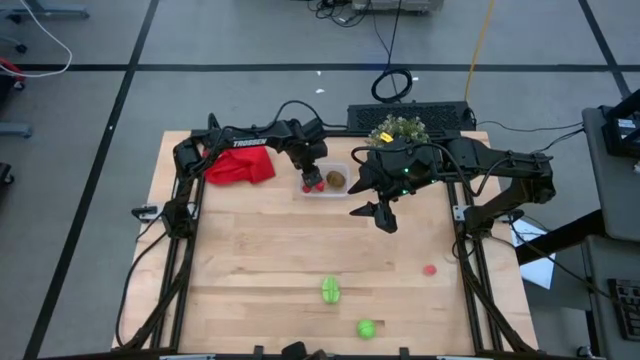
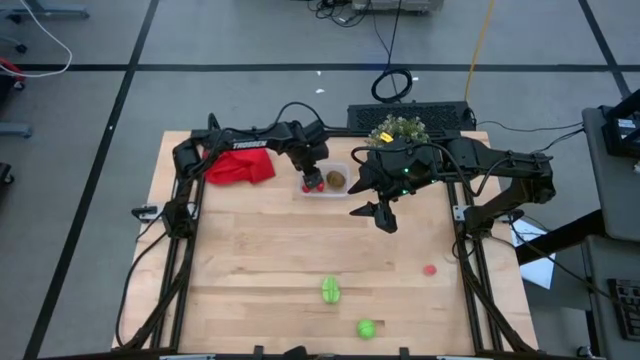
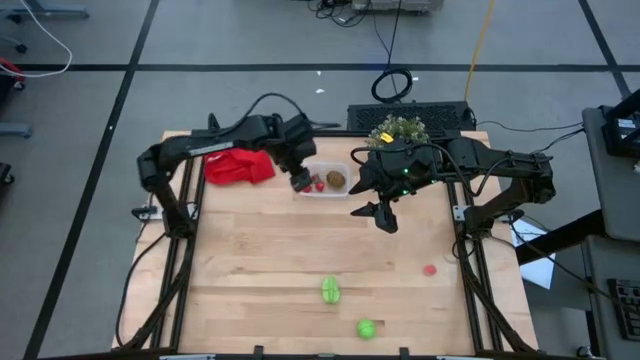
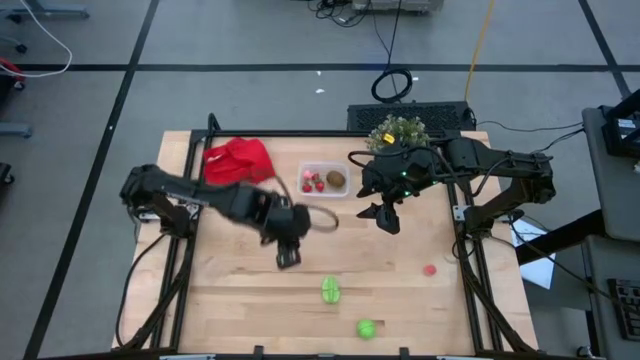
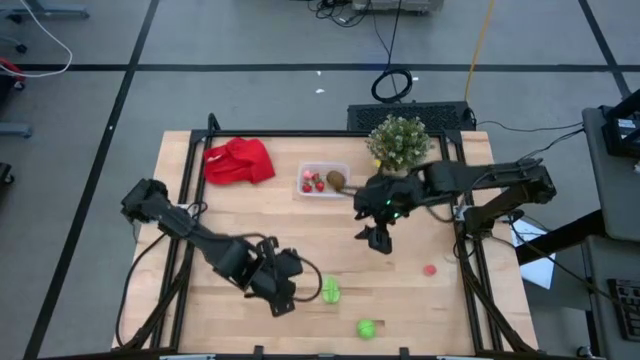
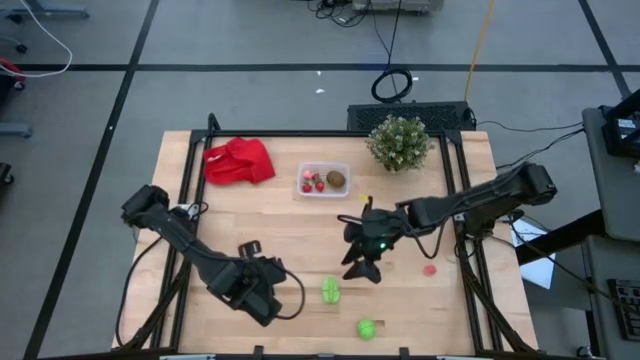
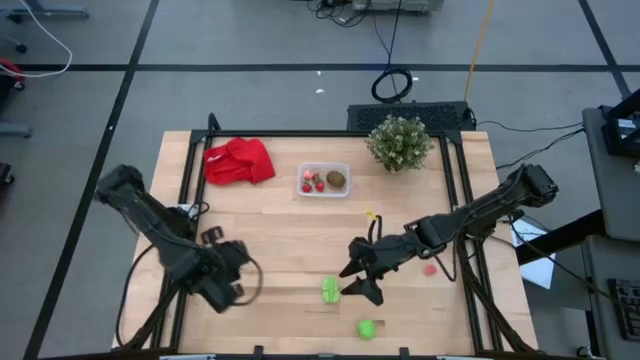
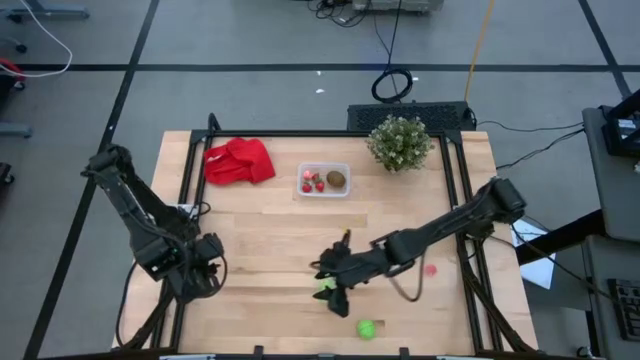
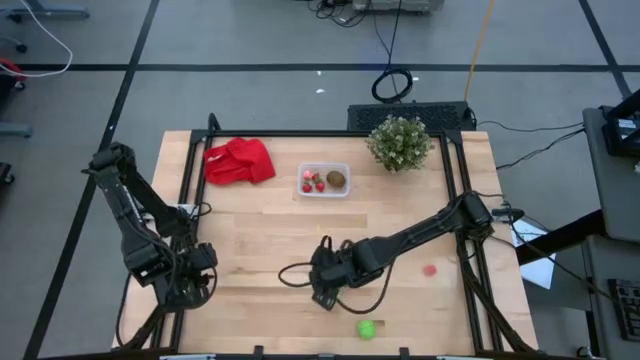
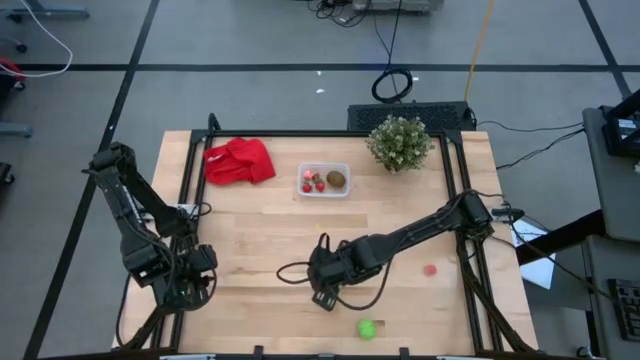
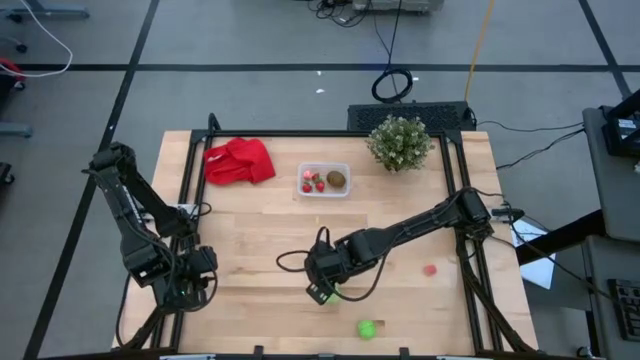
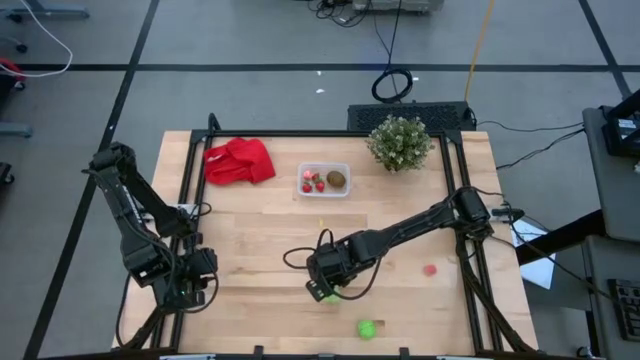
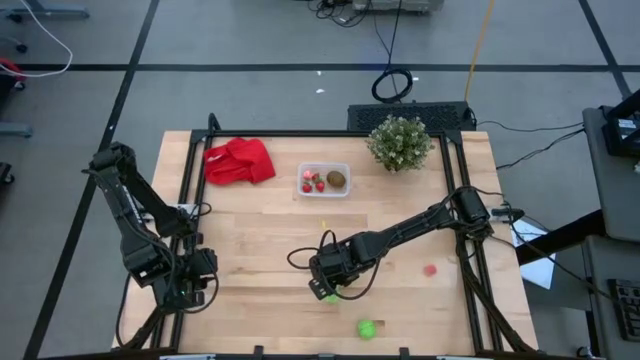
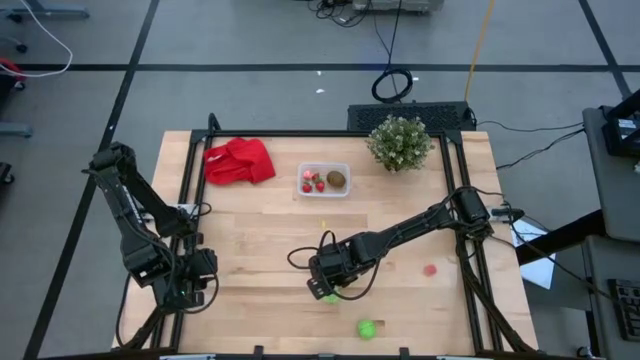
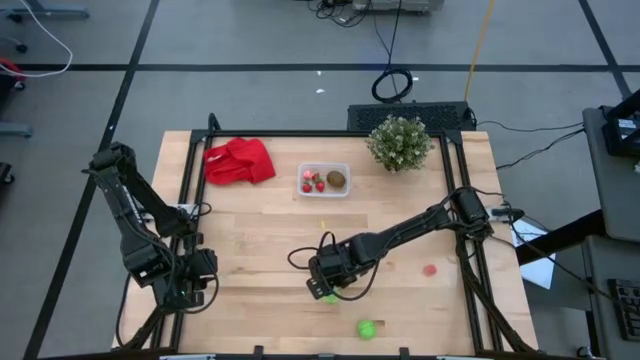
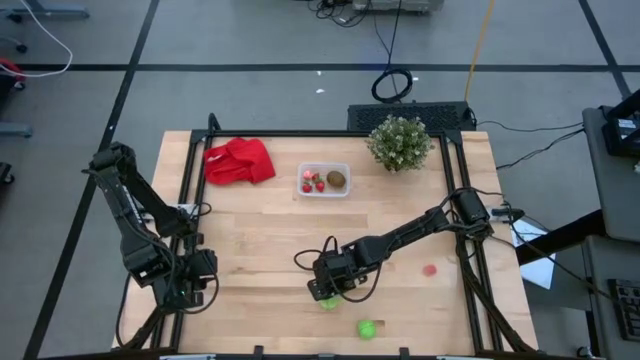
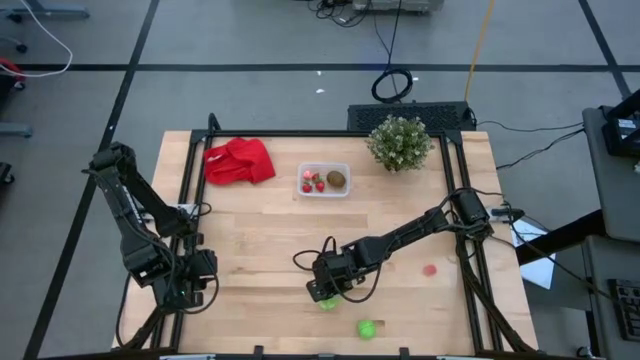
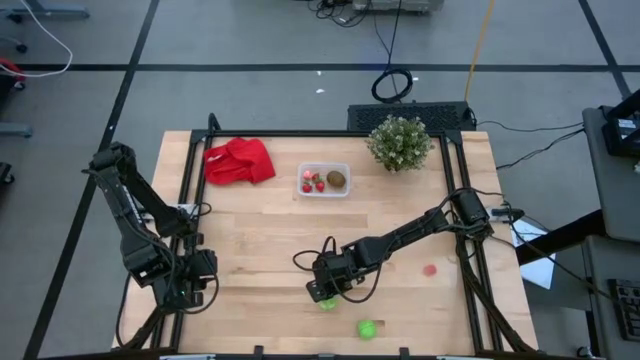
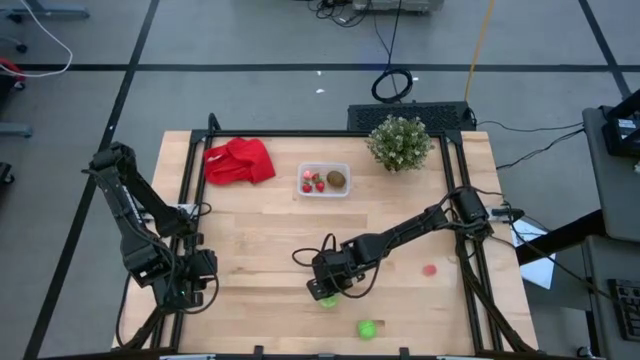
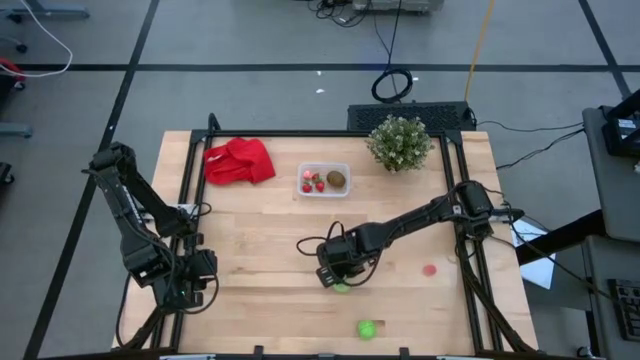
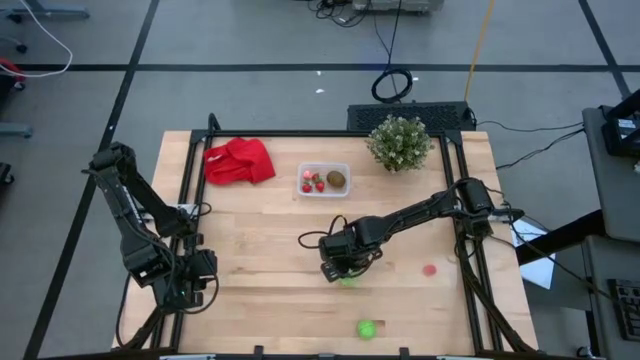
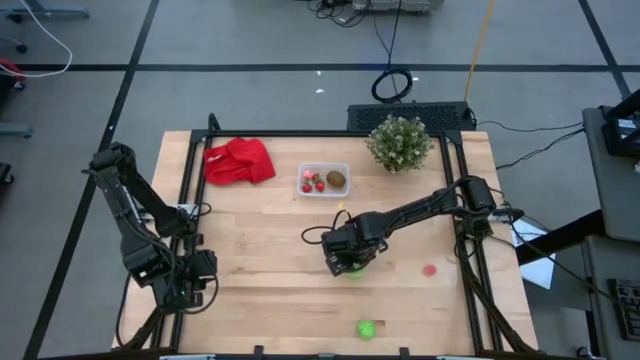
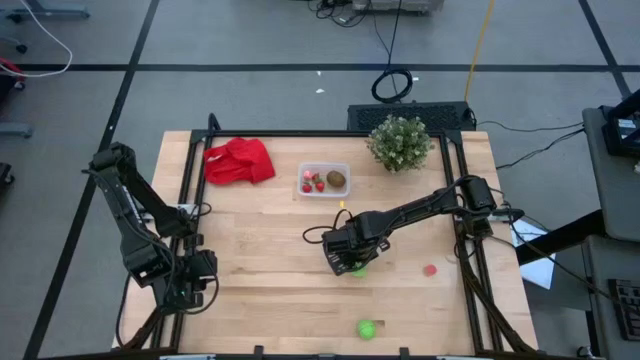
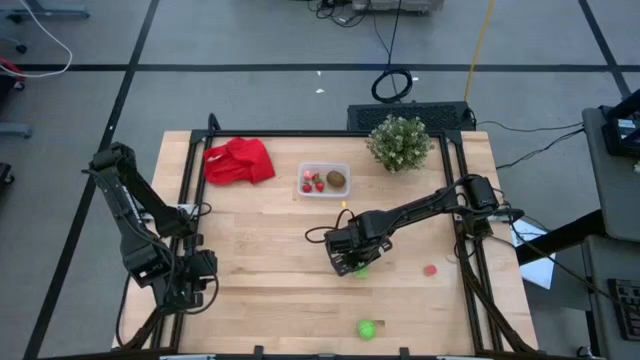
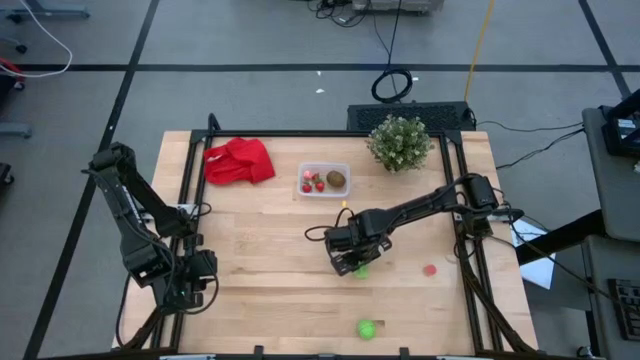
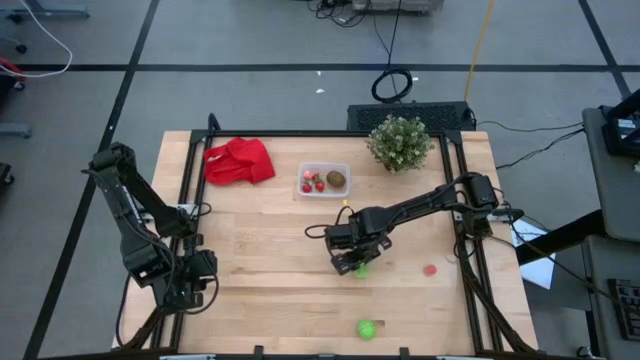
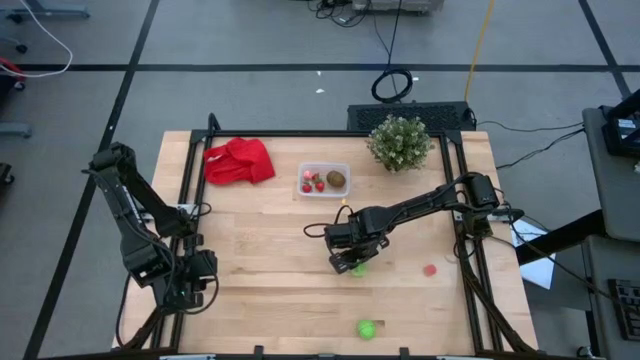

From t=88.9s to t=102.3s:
Task: Pick and placing Produce into tupperware
Put the starfruit into the bin

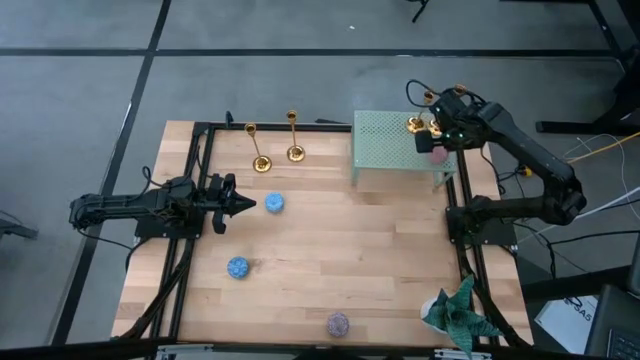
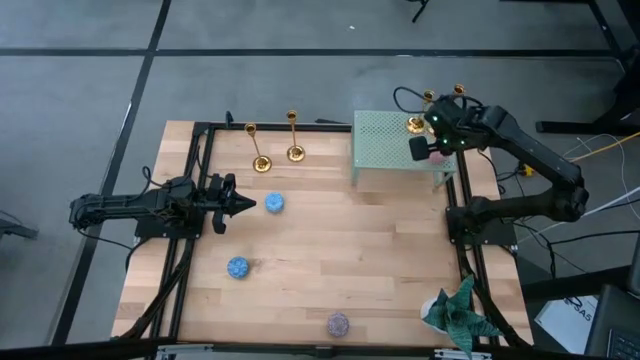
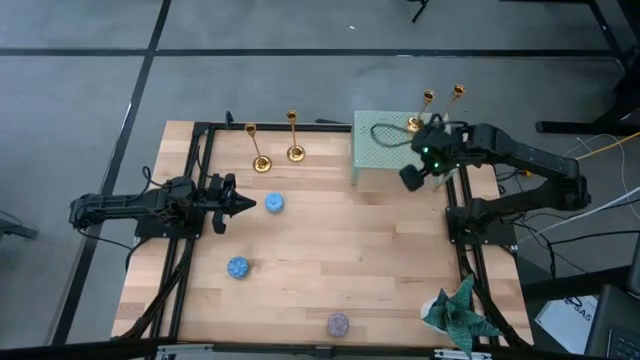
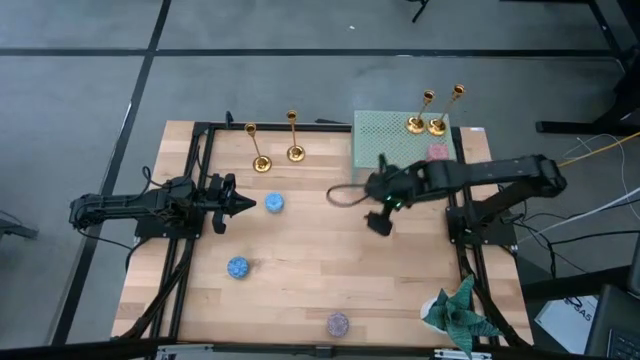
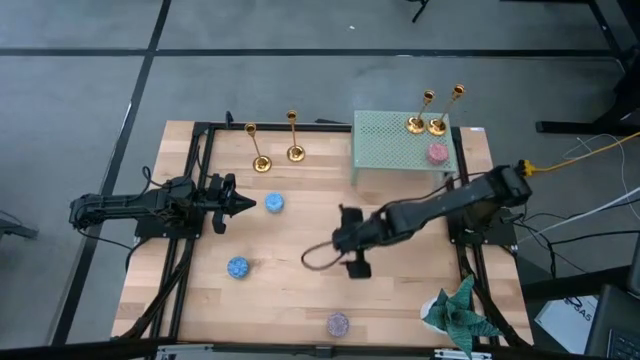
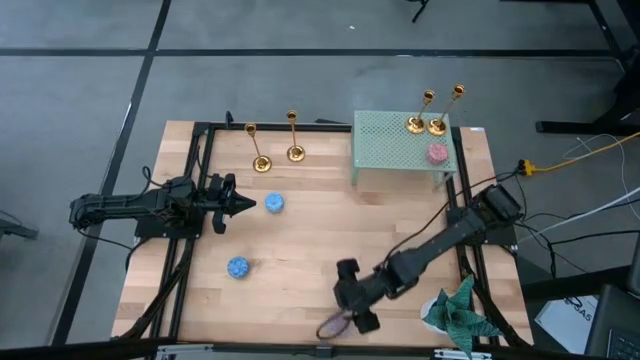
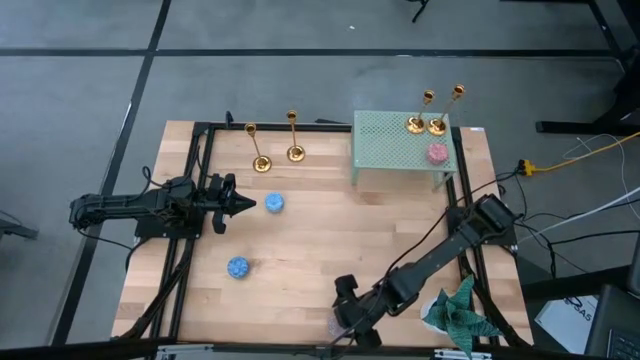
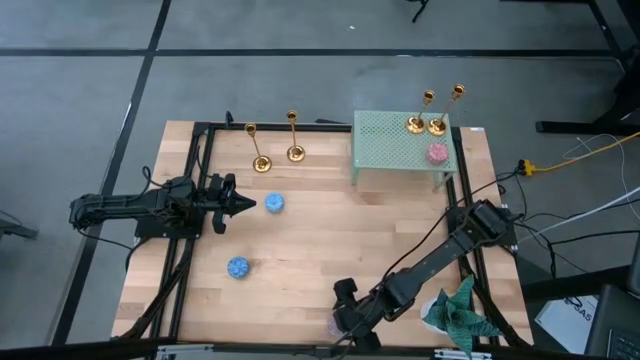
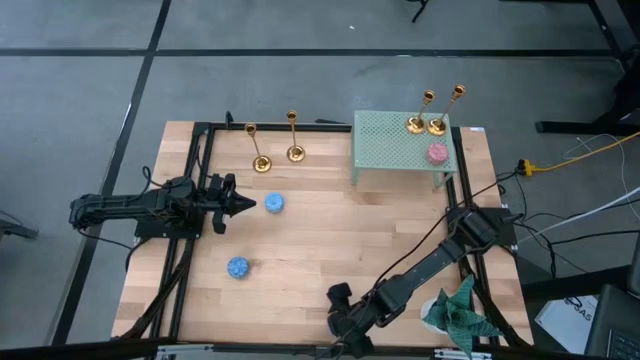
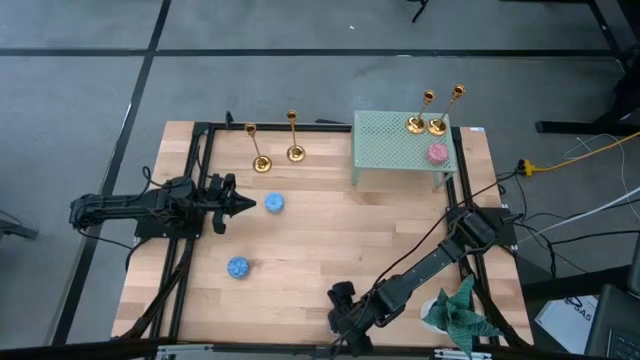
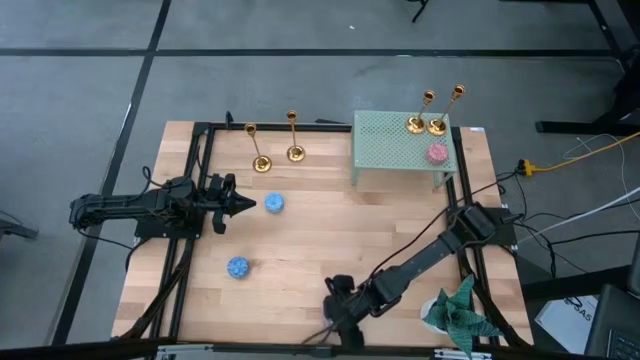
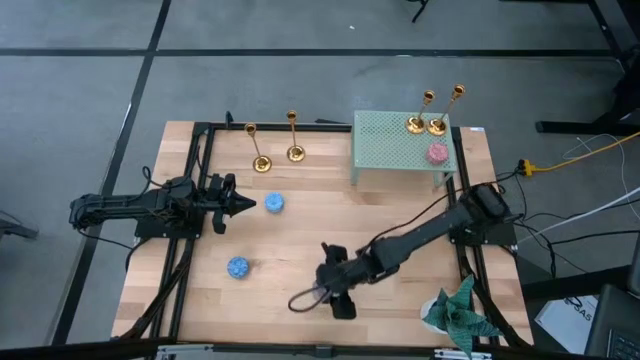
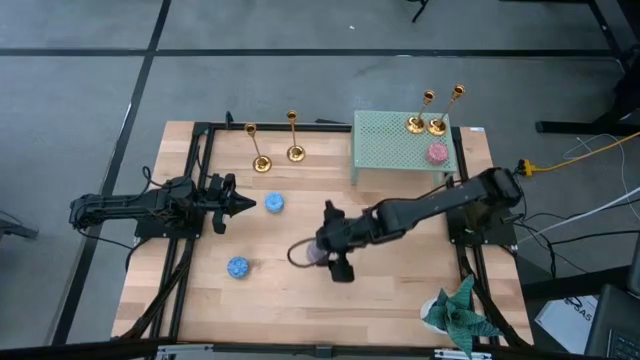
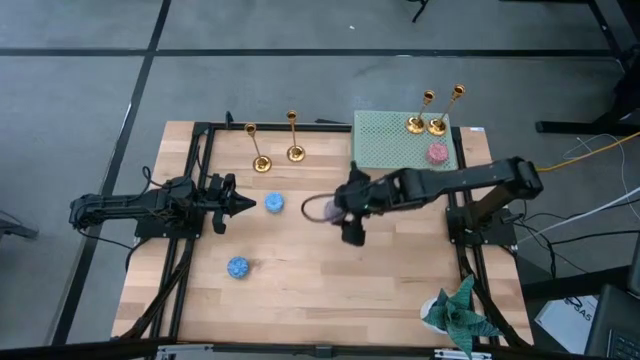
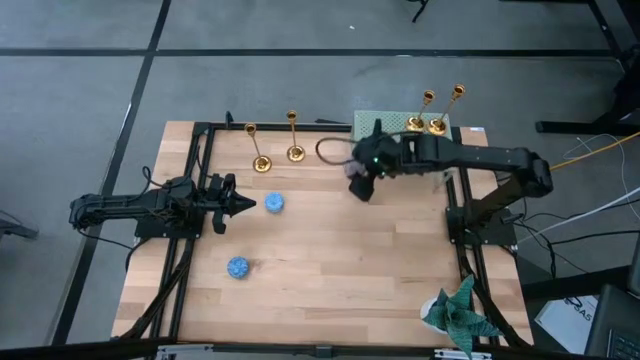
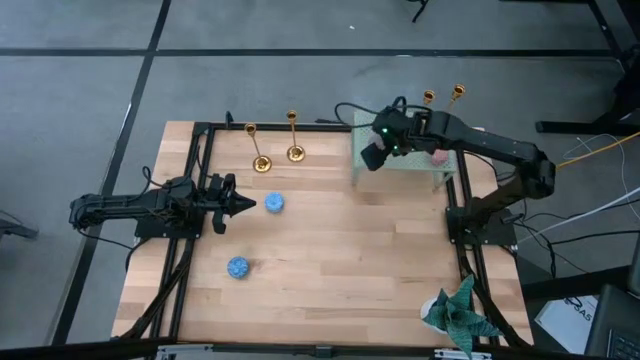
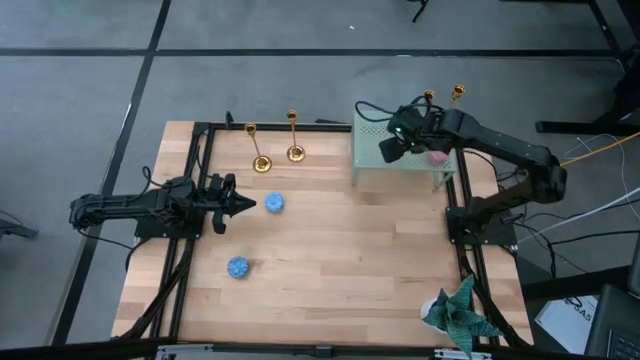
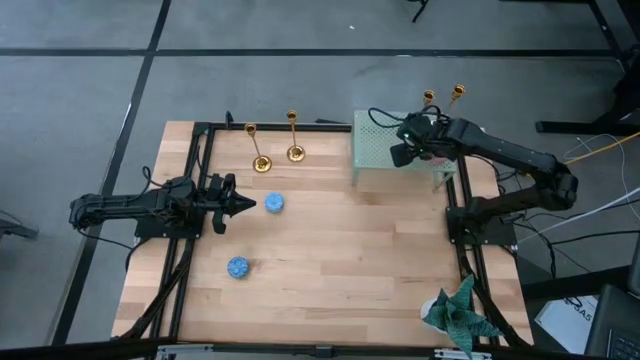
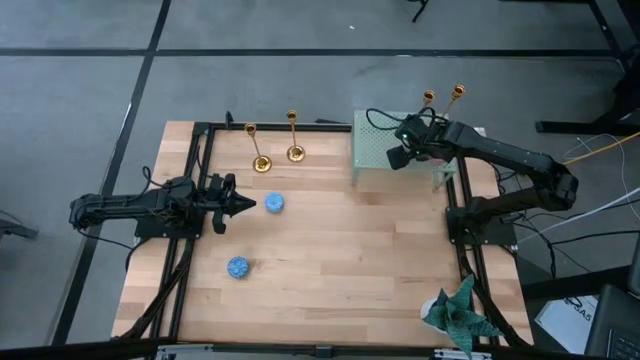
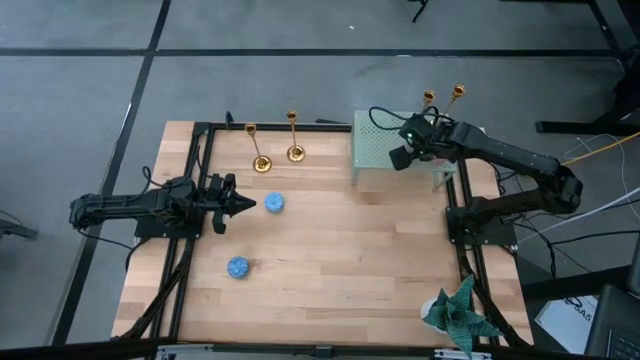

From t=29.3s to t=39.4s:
Task: Pick & Place candle stick holders
Put the red scented candle on the shelf
